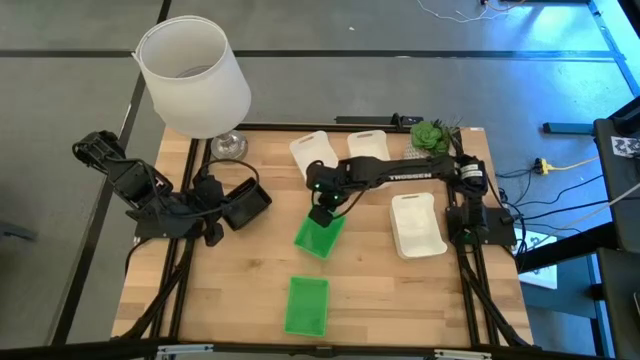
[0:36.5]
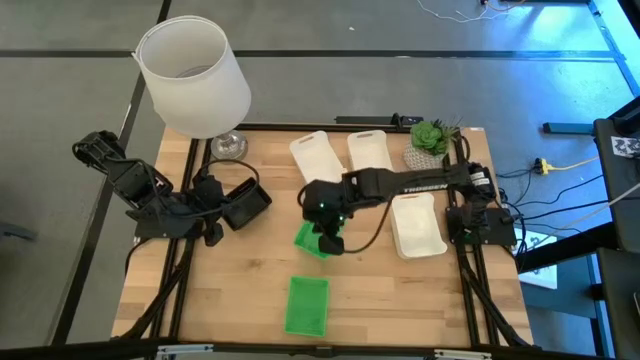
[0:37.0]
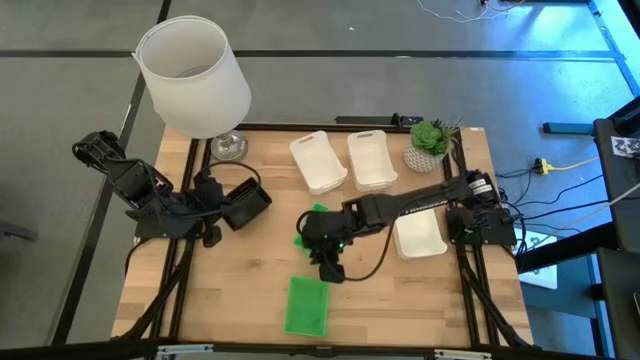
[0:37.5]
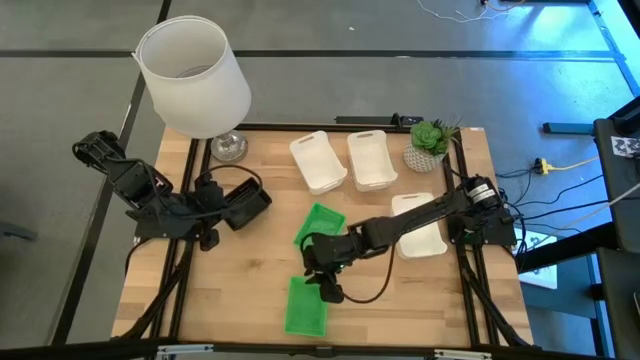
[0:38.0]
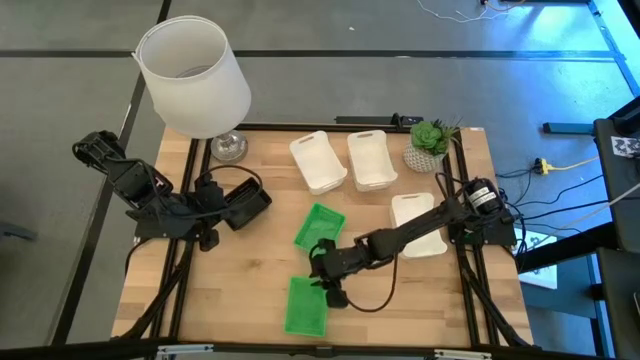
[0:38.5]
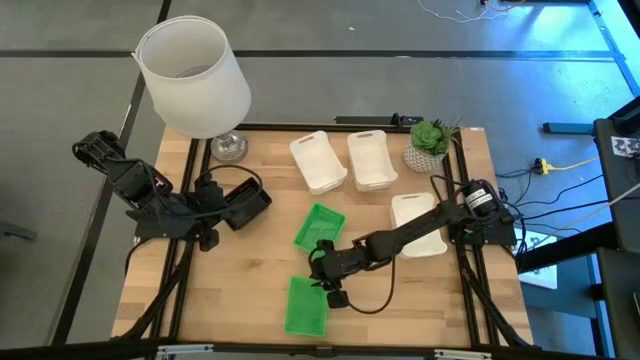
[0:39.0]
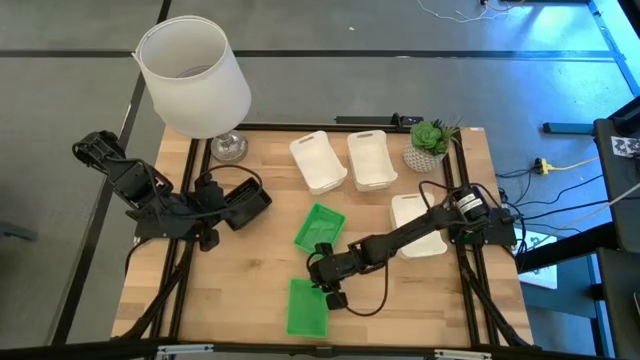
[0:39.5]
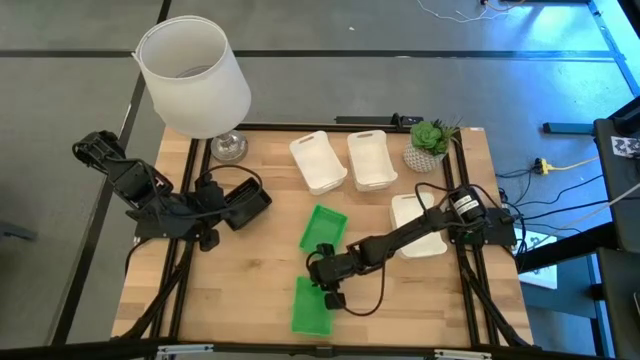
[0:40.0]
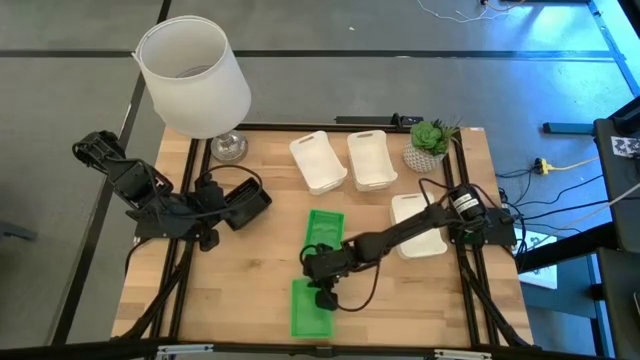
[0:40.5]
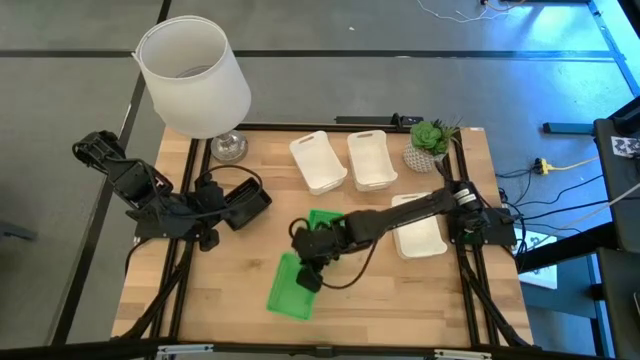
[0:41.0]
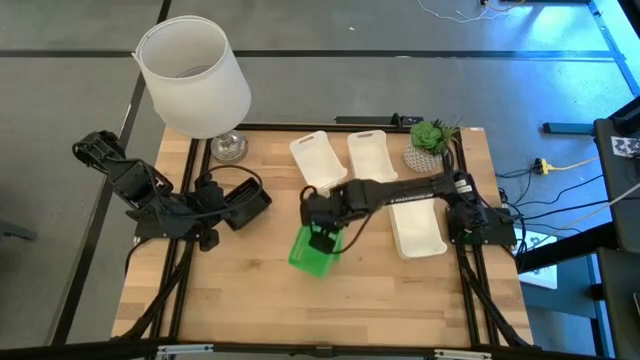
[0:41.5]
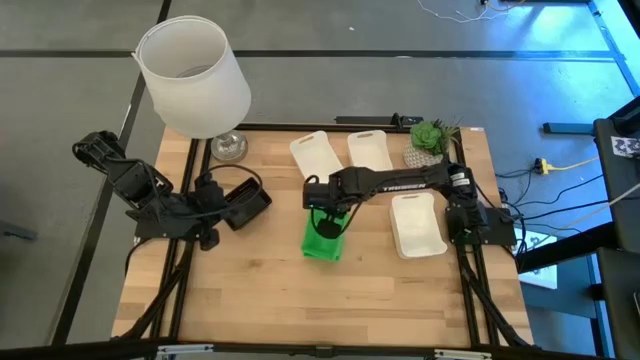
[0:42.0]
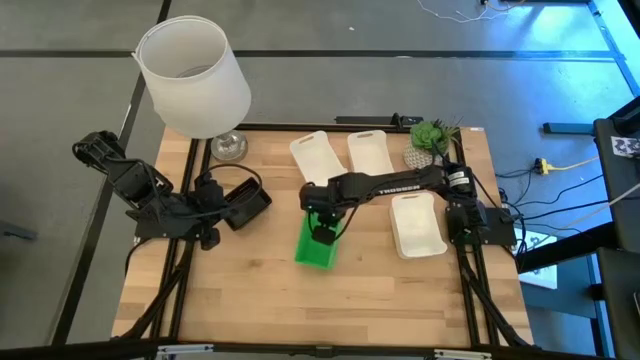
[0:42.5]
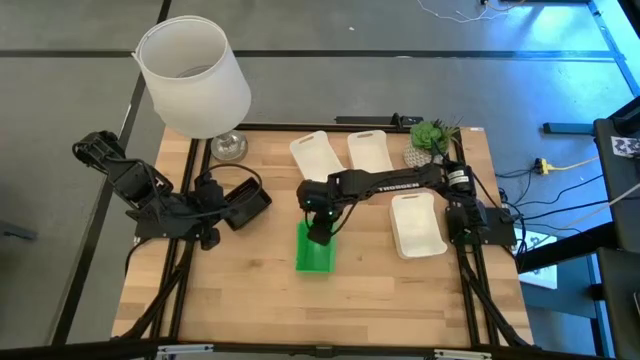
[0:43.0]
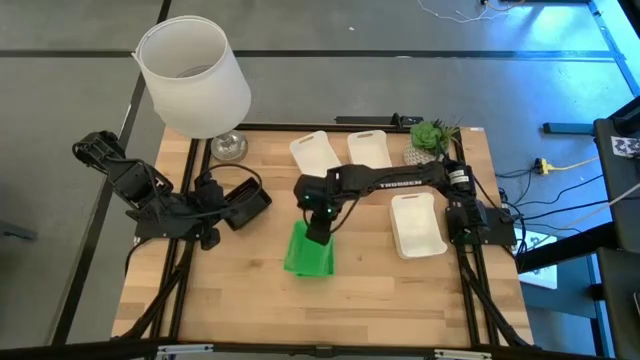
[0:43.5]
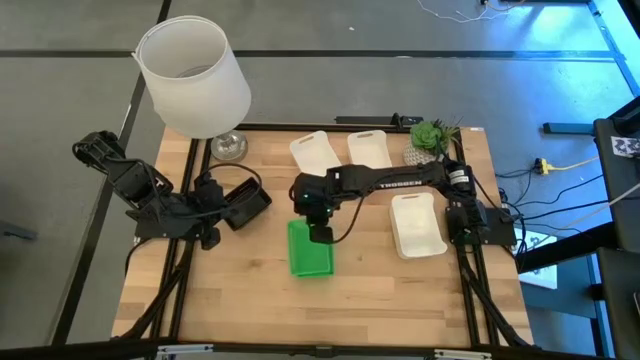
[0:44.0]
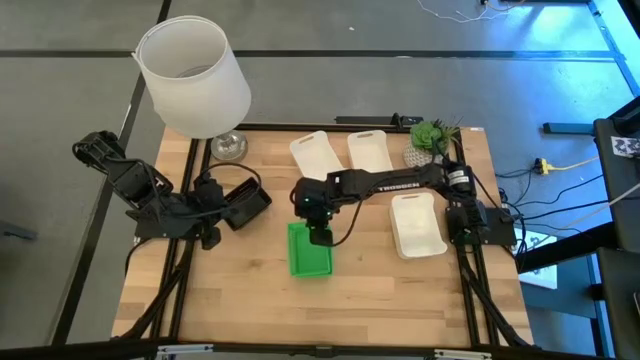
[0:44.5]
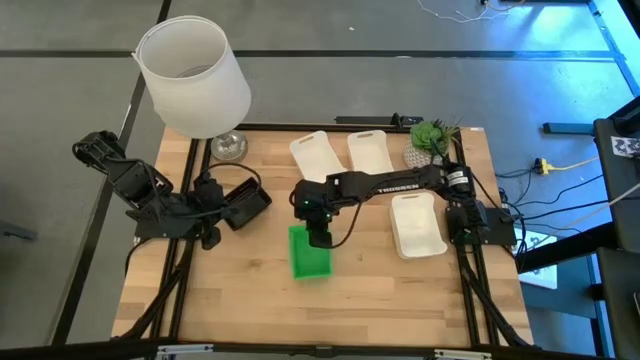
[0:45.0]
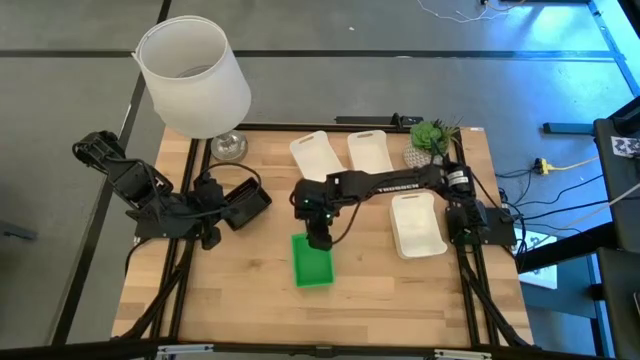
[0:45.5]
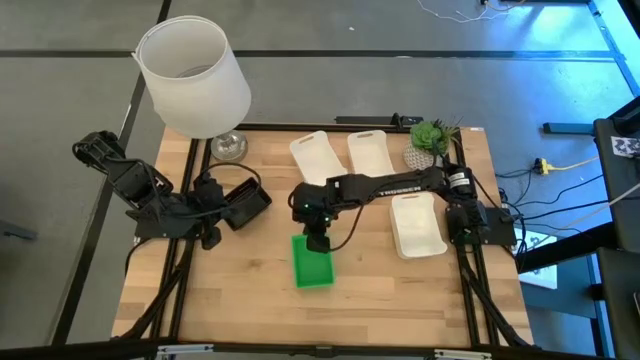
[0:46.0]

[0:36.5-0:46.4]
Stack the bottom green bin on the other green bins

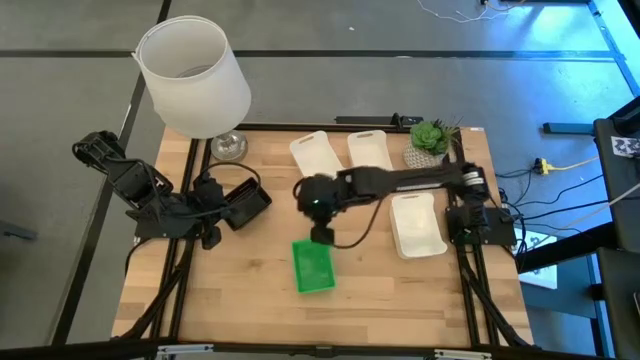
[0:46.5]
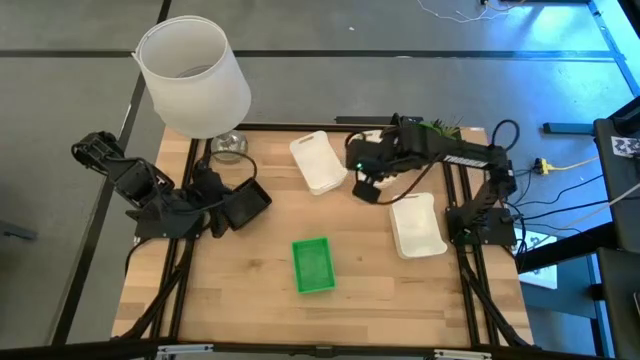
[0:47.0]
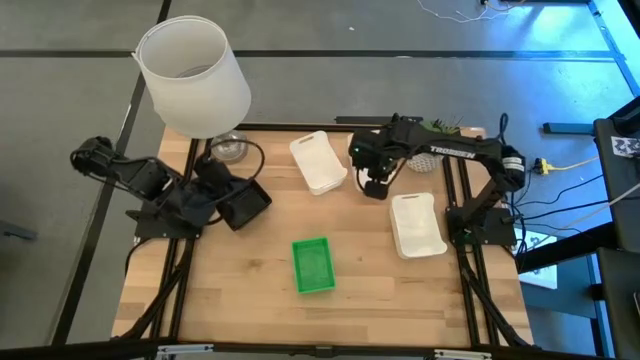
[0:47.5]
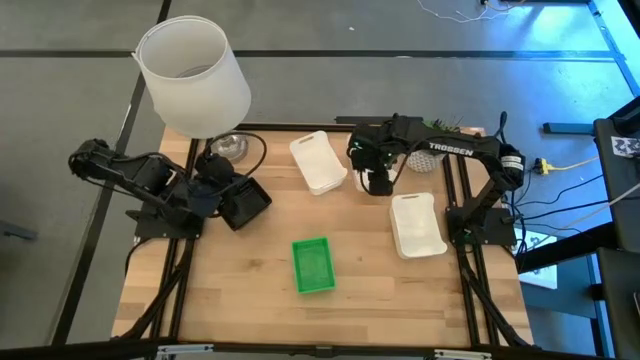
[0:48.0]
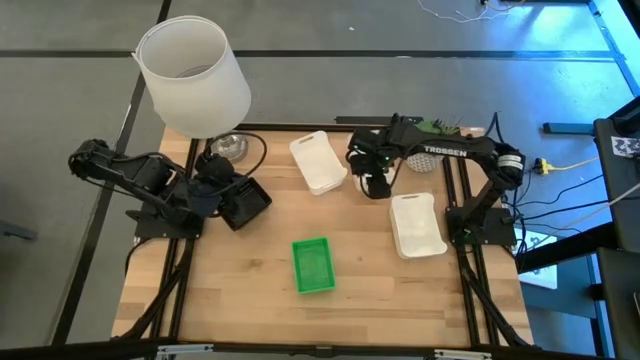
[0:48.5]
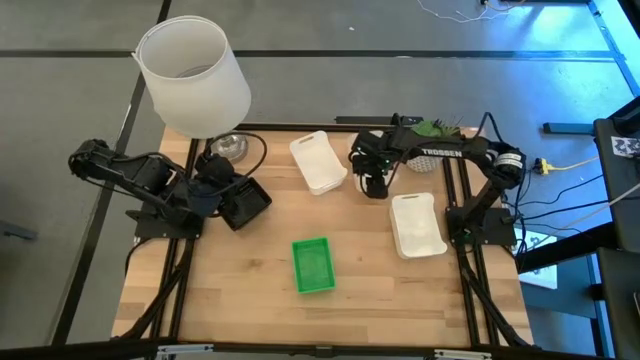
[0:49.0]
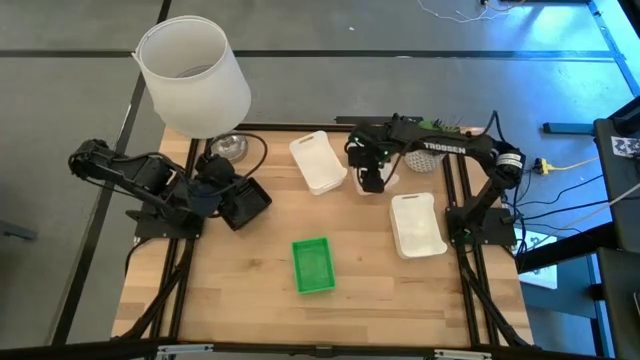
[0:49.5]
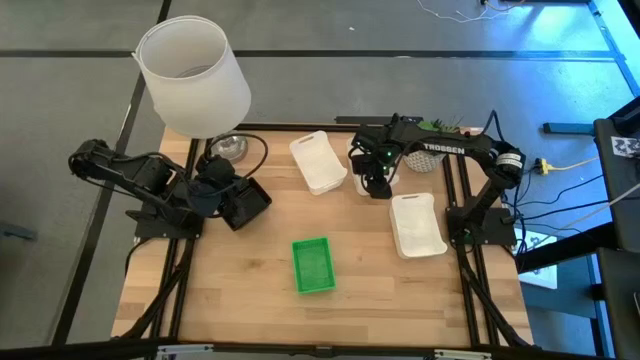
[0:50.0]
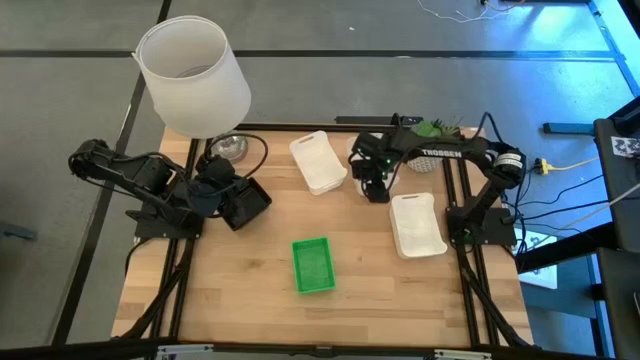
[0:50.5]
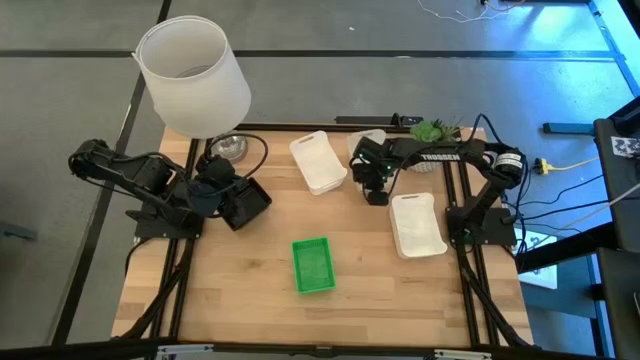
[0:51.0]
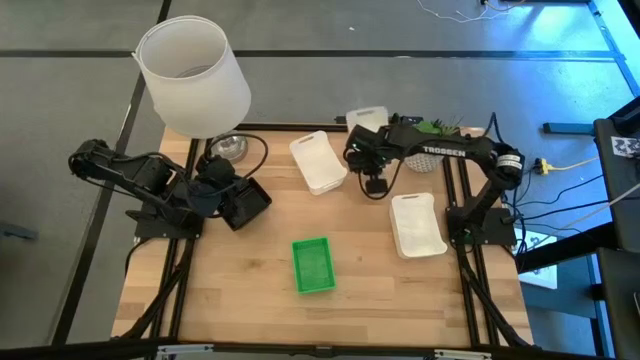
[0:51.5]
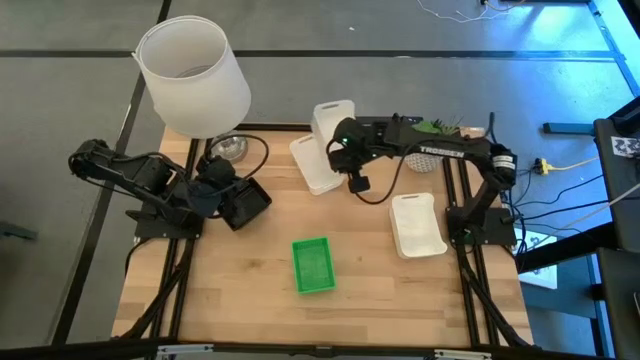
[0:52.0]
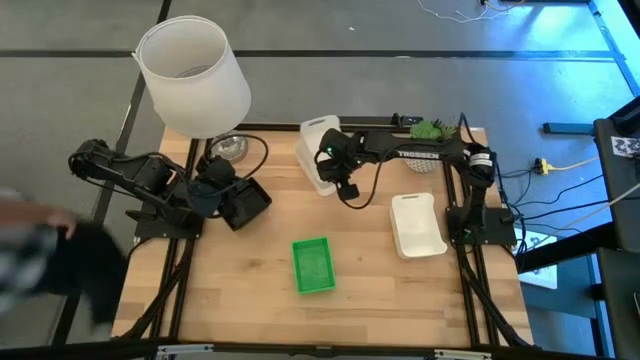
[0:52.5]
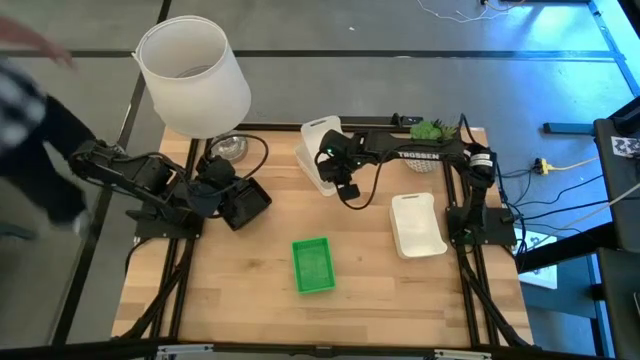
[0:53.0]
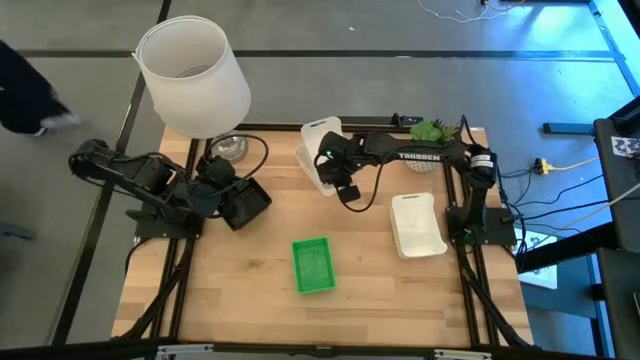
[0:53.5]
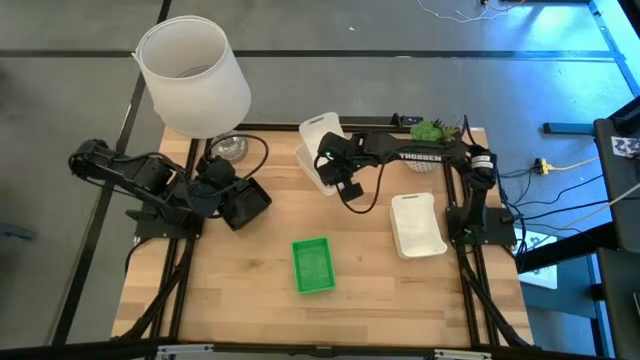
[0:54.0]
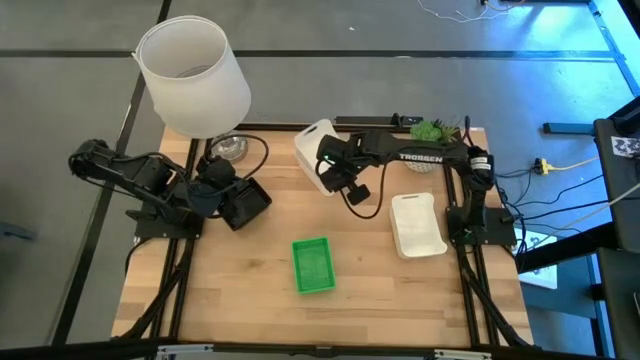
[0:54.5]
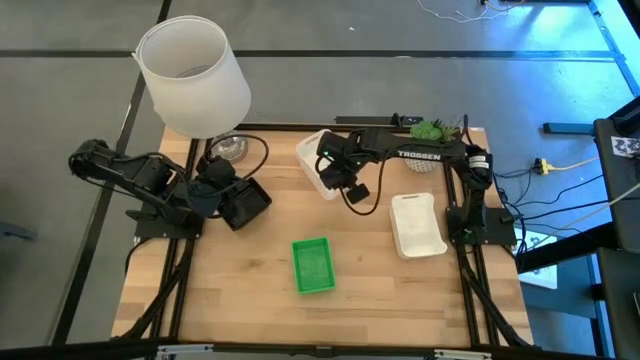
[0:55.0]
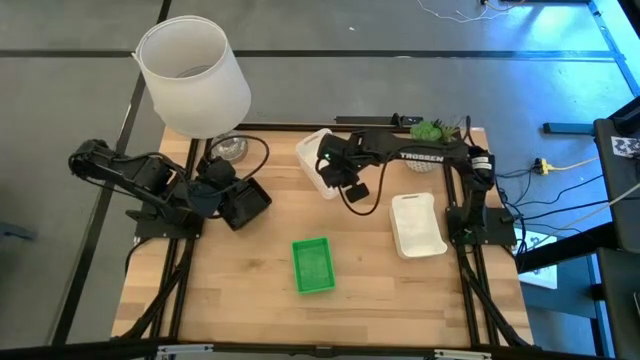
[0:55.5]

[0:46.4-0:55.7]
Stack the middle white bin on the white bin
